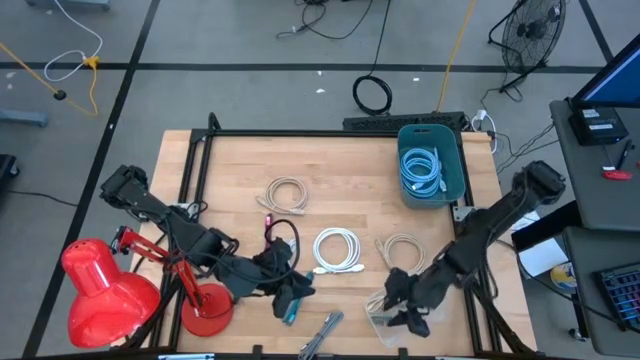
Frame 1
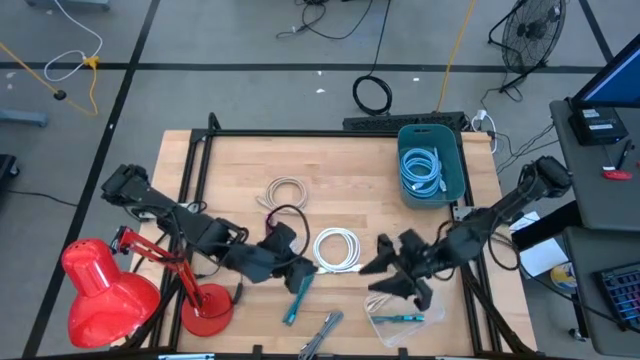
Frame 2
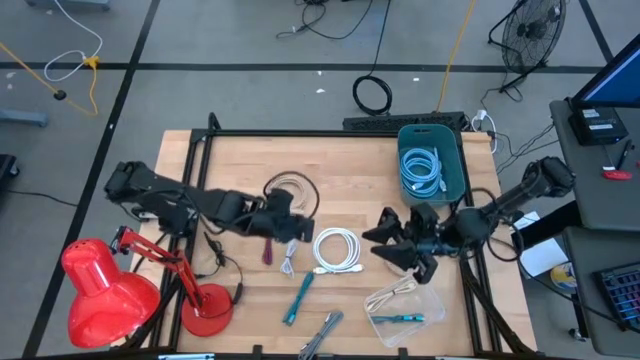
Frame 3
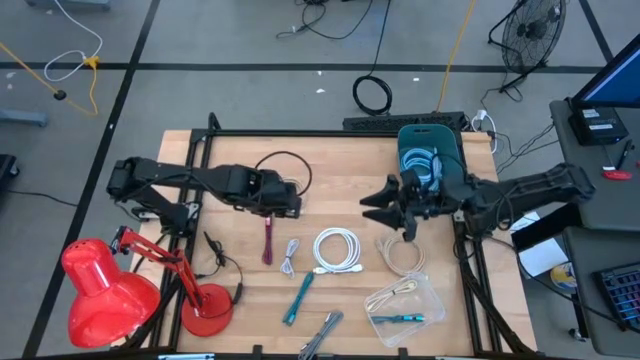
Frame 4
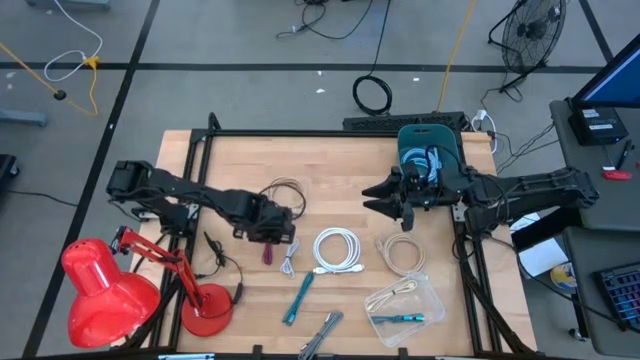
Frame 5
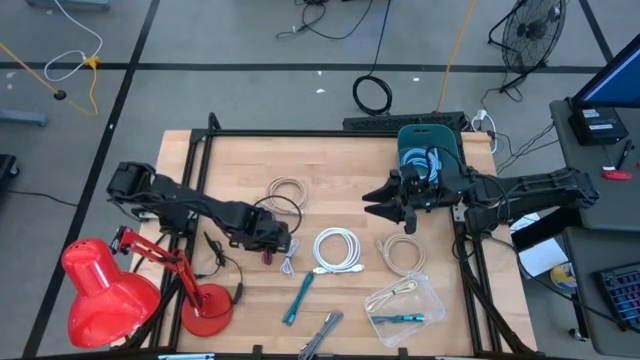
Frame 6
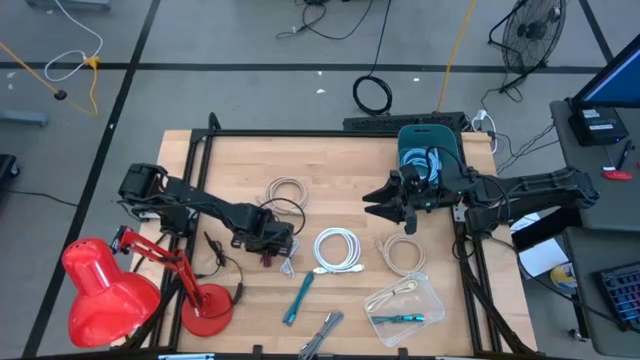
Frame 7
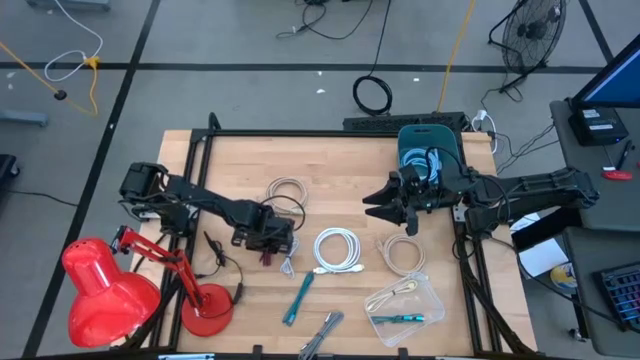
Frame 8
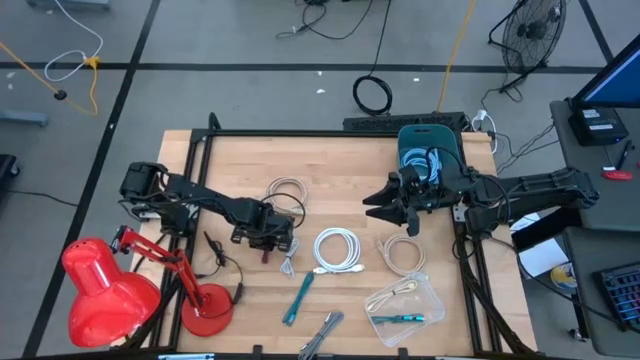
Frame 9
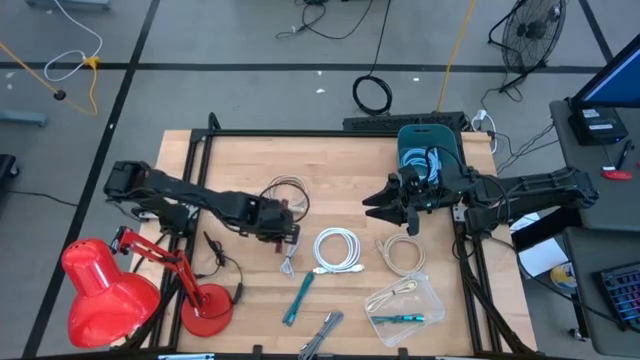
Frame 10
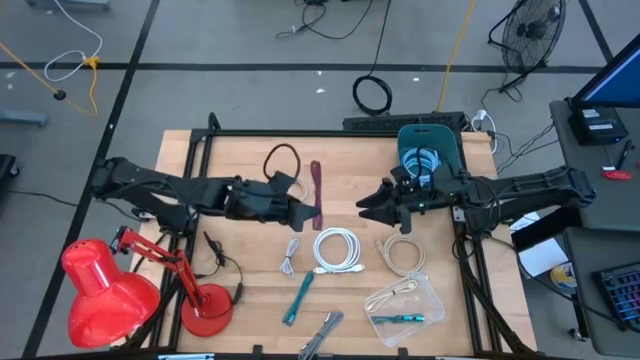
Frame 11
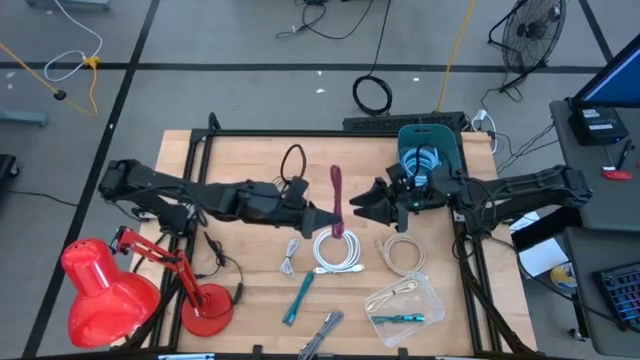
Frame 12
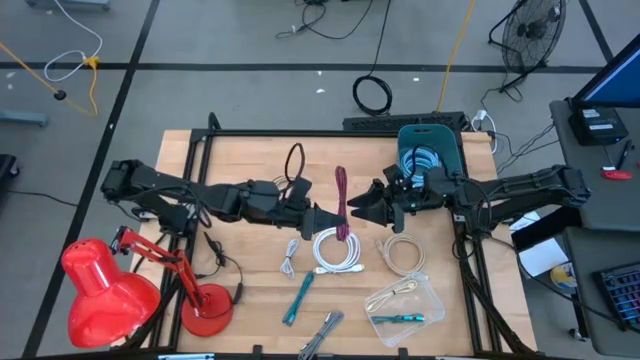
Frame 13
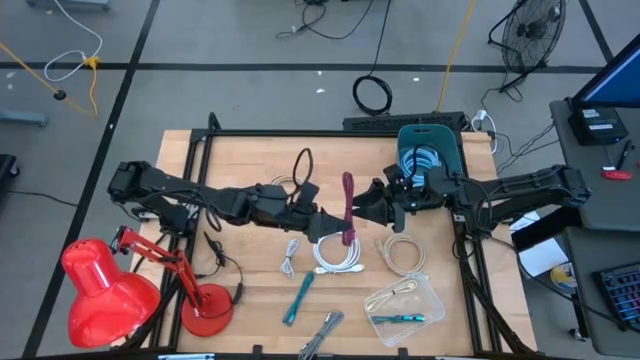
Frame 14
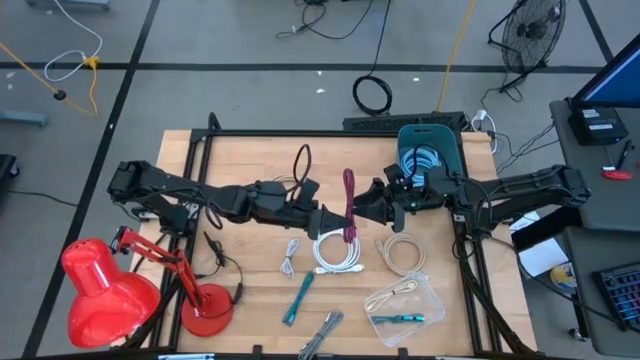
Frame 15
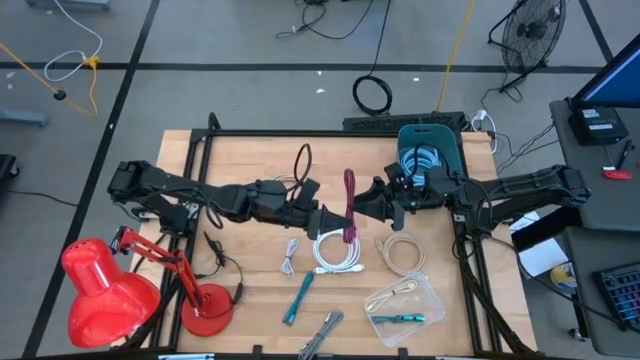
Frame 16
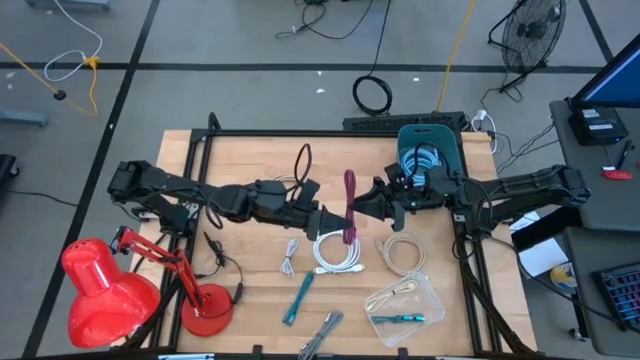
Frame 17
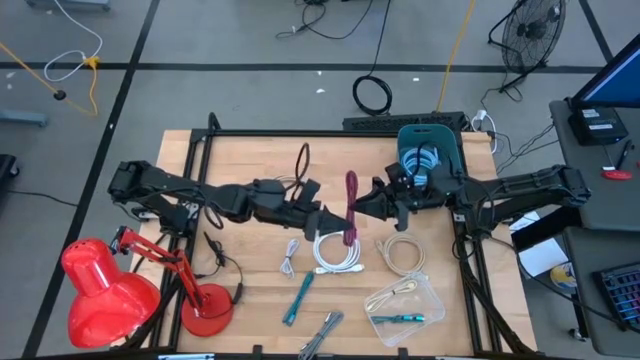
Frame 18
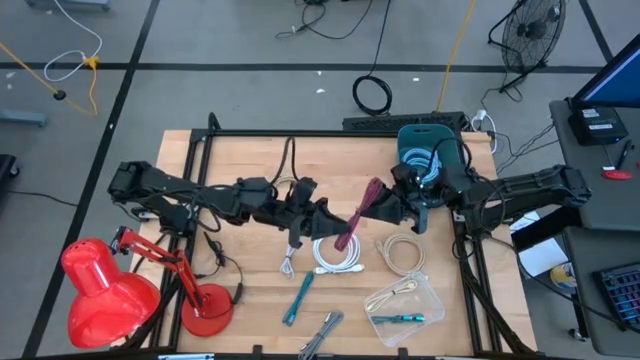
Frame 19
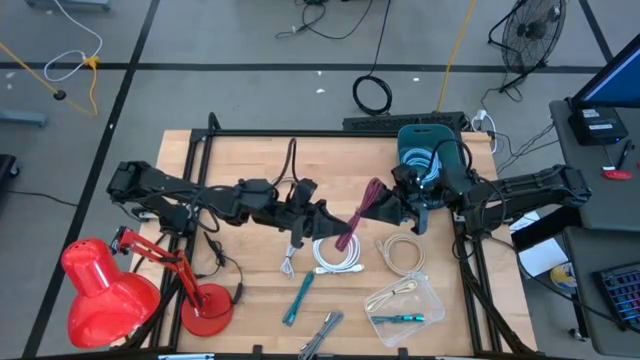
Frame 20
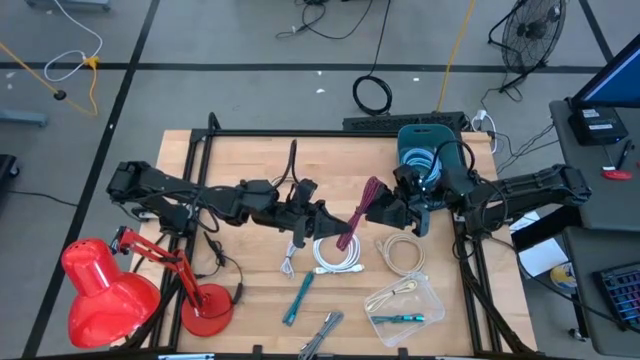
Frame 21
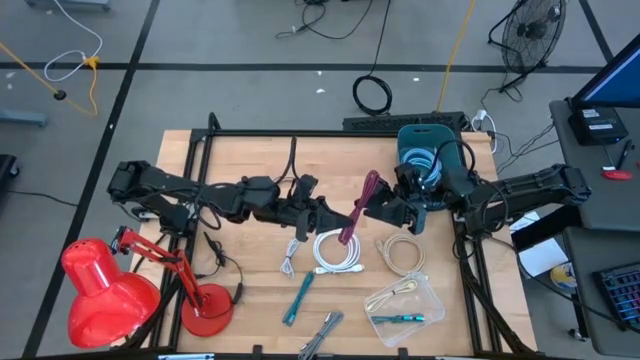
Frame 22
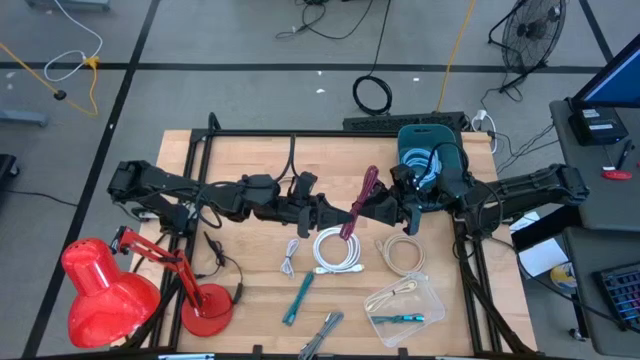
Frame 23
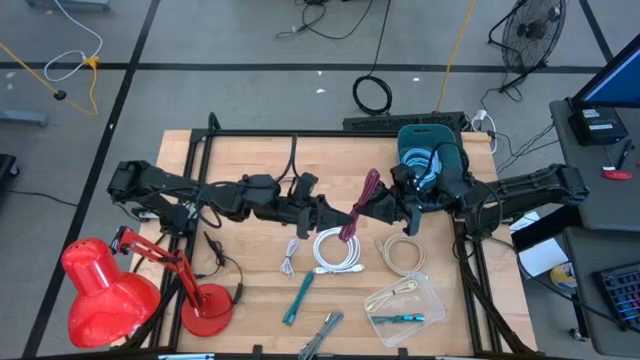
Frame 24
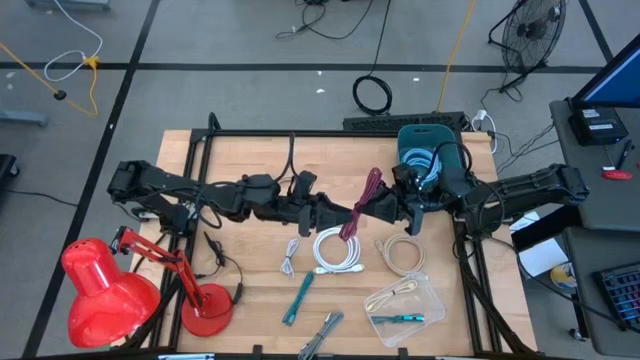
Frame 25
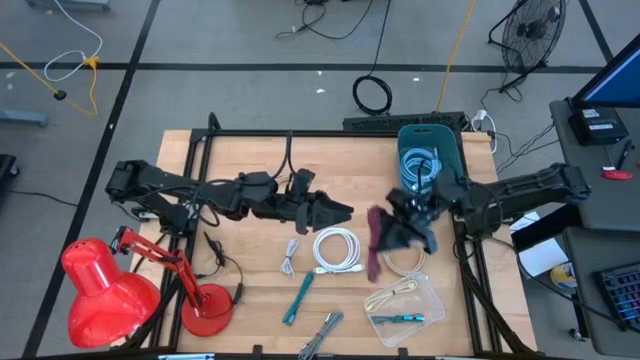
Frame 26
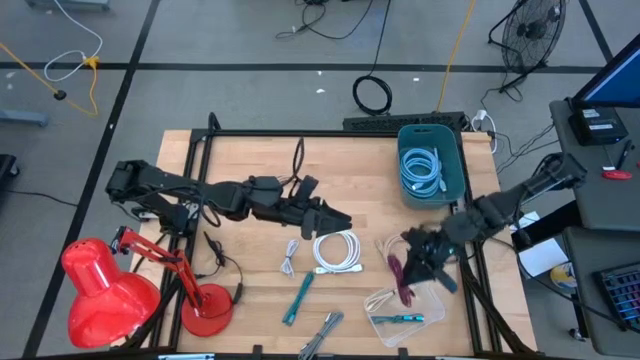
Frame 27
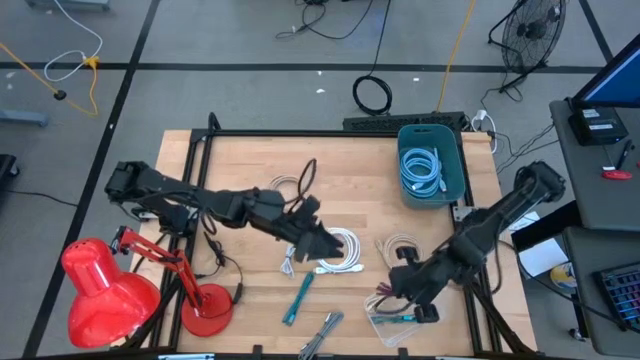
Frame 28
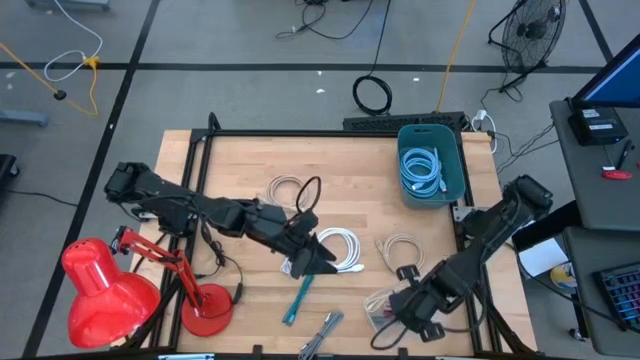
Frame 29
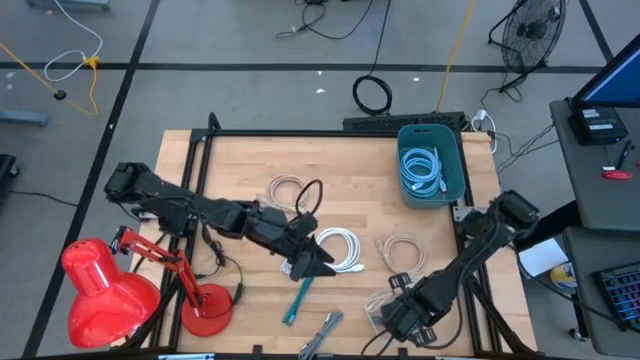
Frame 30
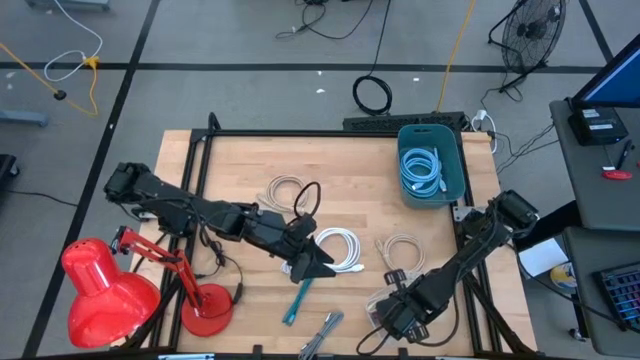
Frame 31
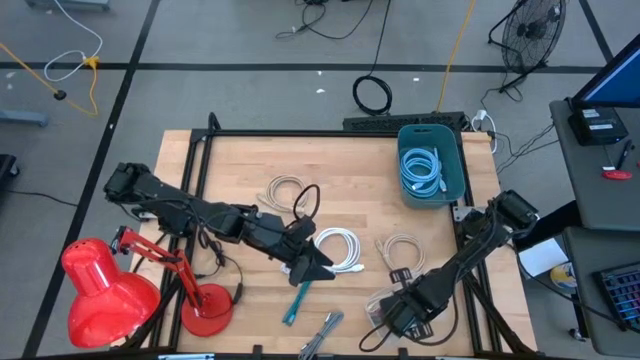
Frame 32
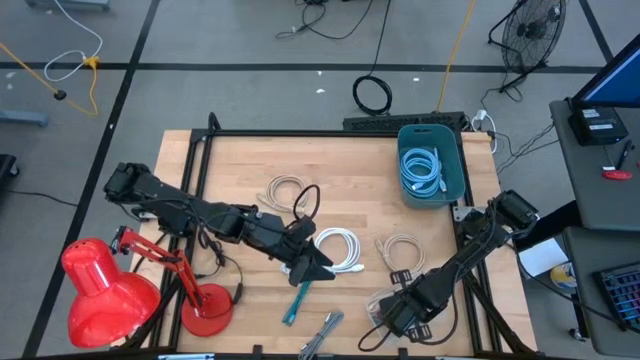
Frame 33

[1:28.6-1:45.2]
Task: Pick & Place USB Port
Put the red charger cable into the transparent bin

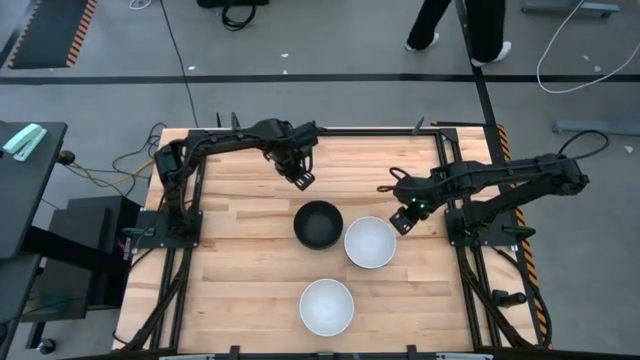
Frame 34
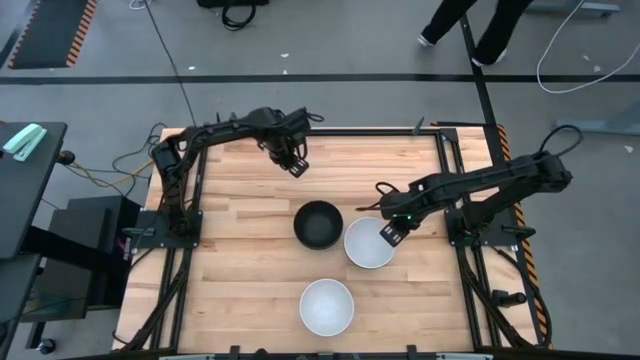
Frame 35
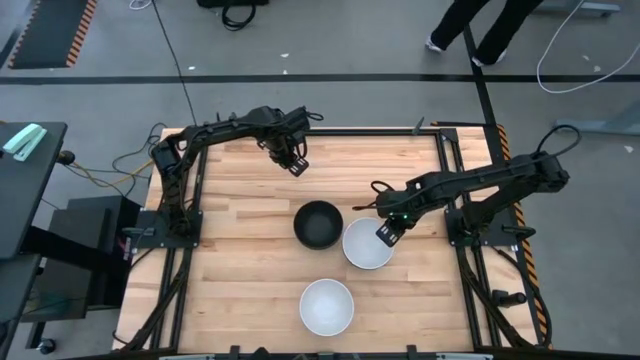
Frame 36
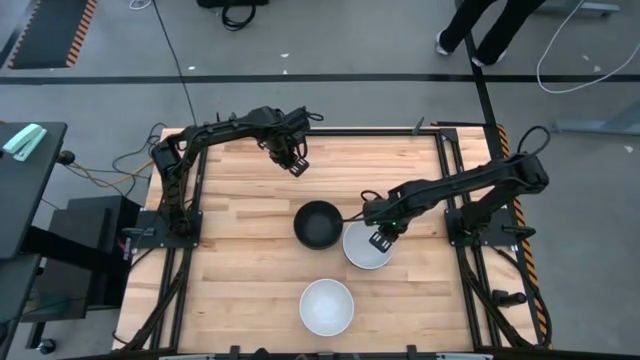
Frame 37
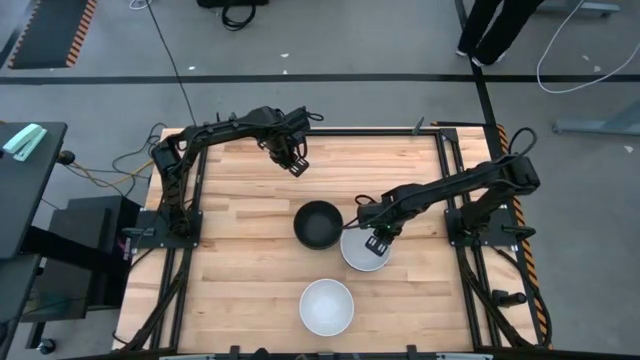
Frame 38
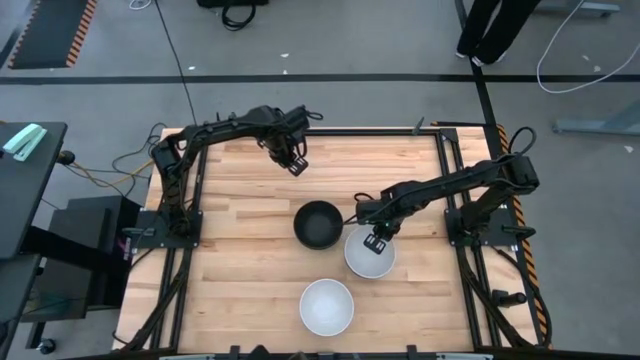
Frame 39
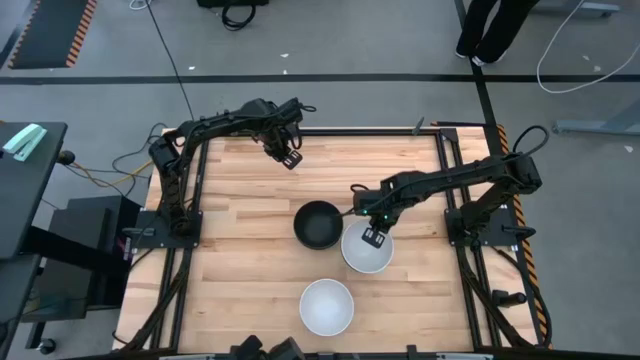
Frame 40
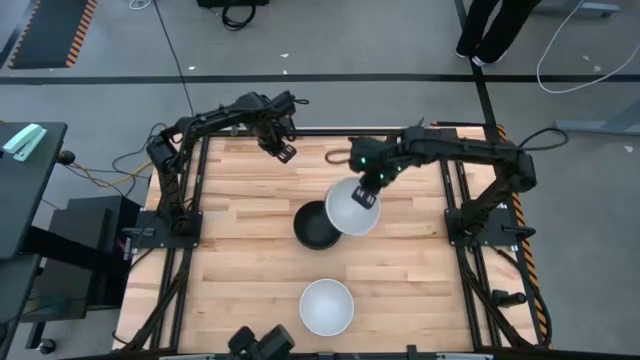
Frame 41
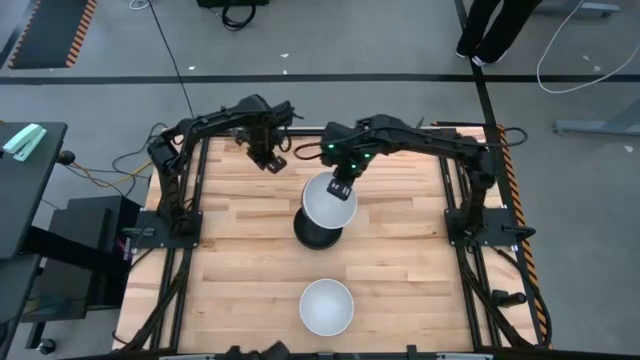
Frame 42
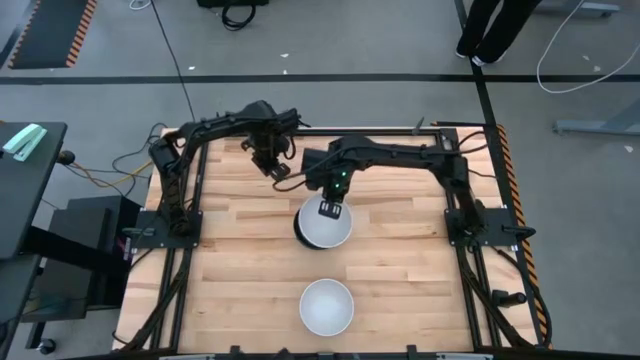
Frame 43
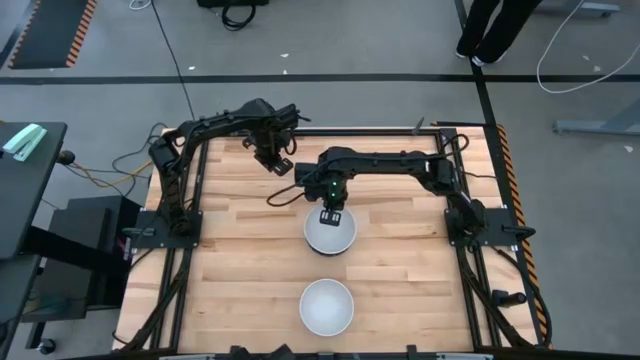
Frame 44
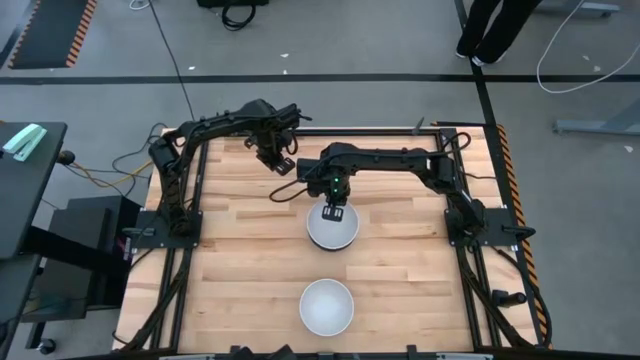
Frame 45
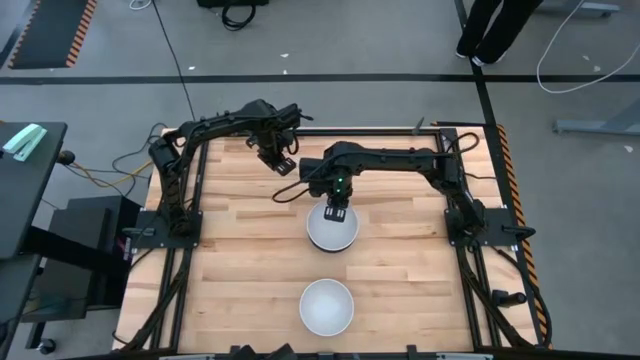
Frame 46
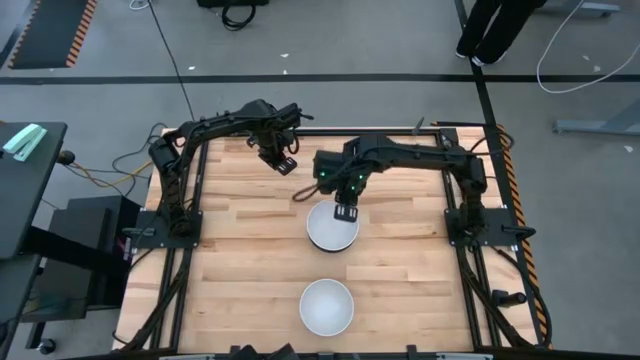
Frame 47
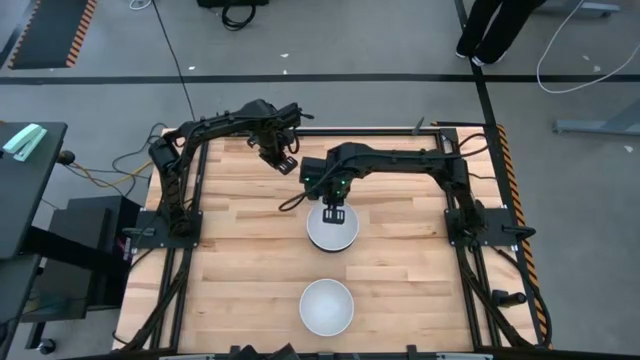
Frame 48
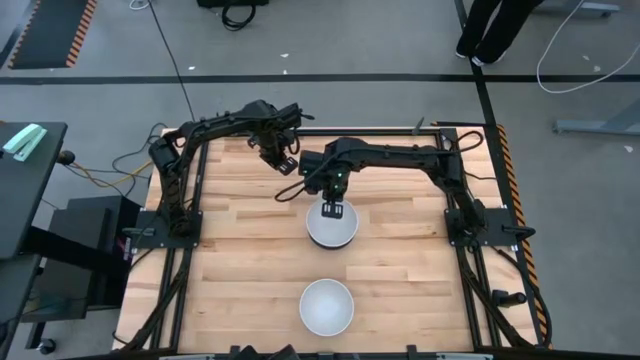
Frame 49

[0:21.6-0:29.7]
Task: Nest bowls inside each other
Stack the stacked white bowls on top of the black bowl
